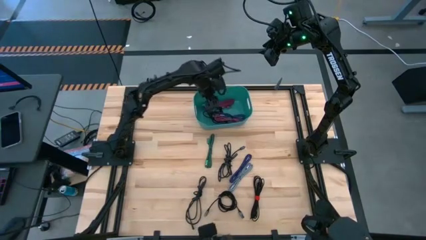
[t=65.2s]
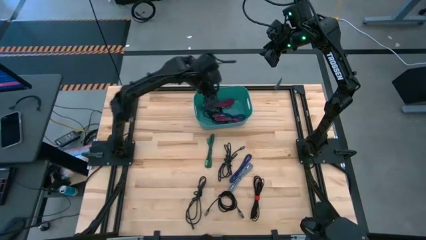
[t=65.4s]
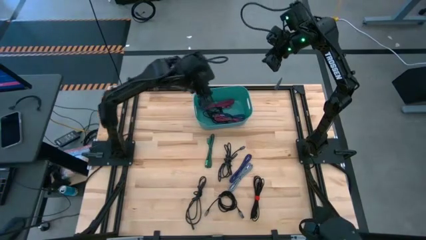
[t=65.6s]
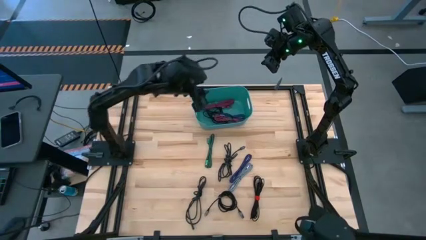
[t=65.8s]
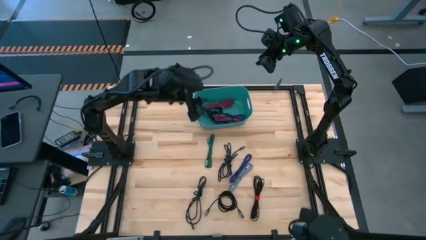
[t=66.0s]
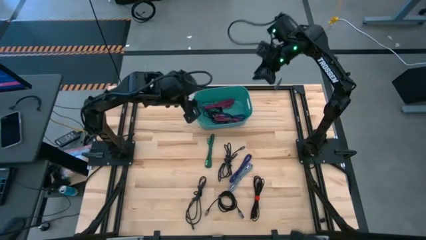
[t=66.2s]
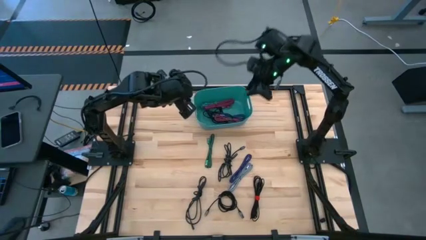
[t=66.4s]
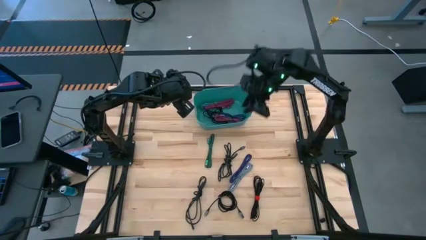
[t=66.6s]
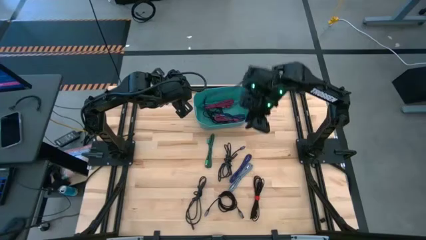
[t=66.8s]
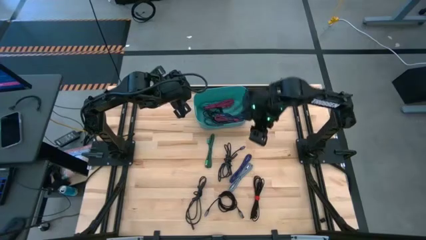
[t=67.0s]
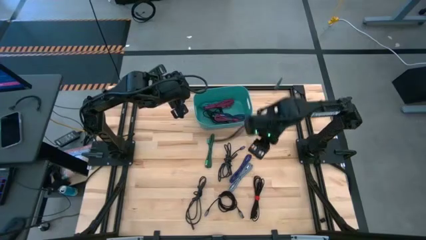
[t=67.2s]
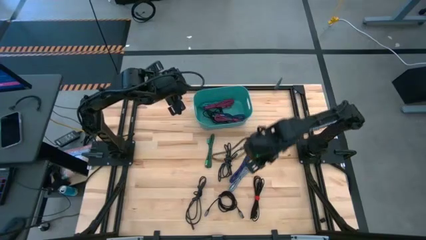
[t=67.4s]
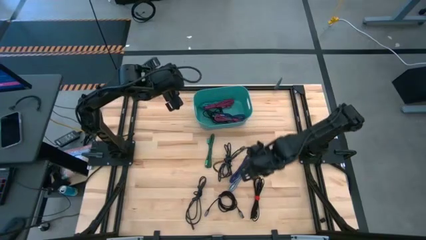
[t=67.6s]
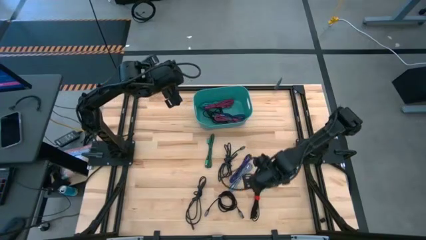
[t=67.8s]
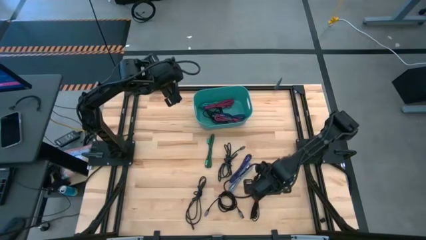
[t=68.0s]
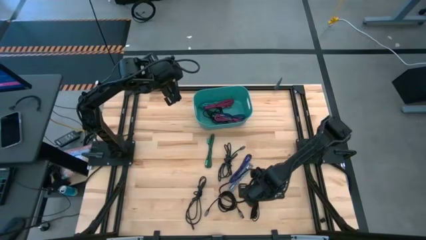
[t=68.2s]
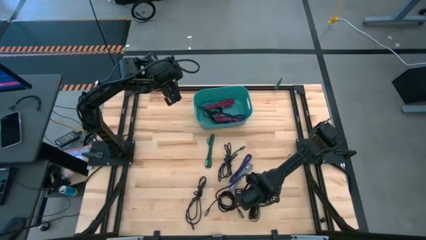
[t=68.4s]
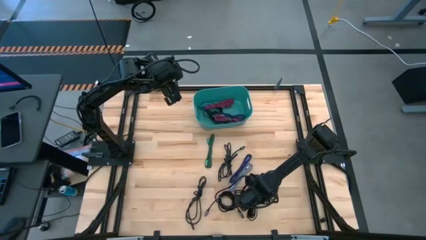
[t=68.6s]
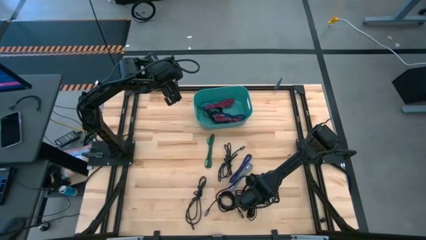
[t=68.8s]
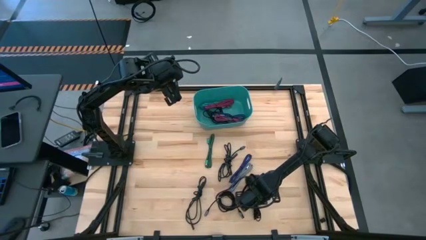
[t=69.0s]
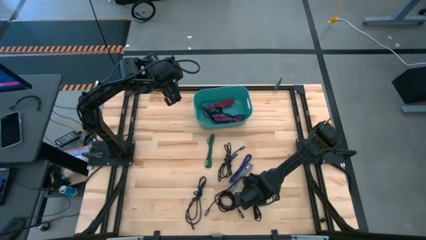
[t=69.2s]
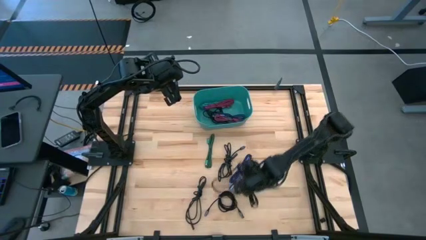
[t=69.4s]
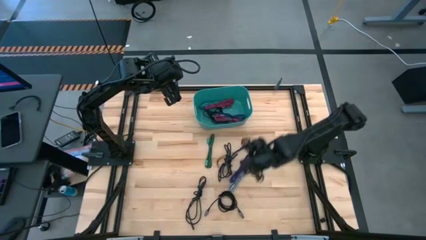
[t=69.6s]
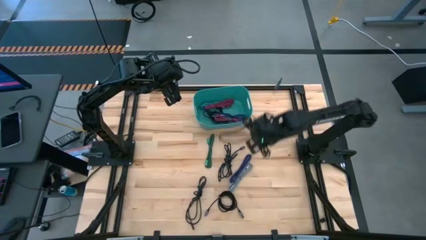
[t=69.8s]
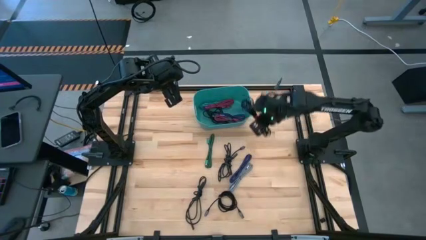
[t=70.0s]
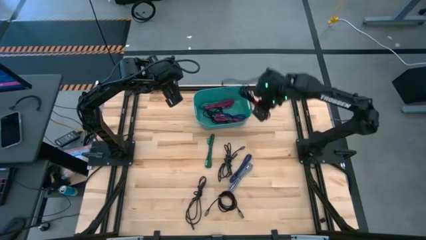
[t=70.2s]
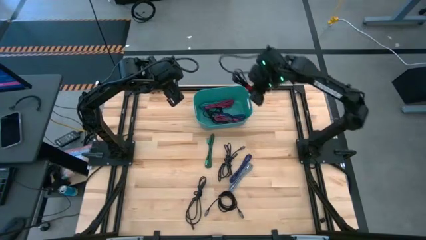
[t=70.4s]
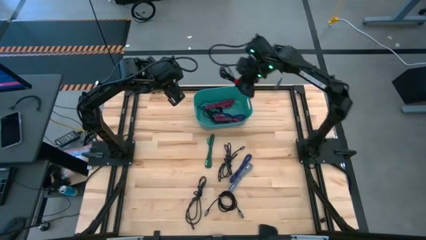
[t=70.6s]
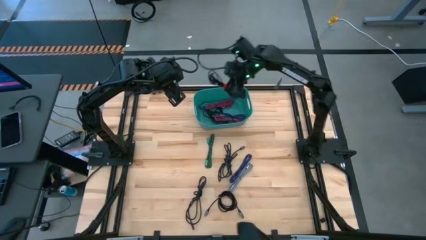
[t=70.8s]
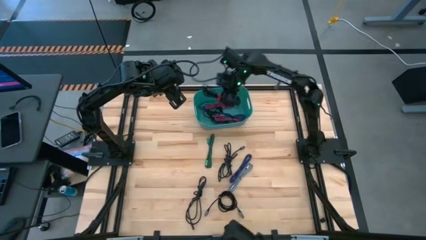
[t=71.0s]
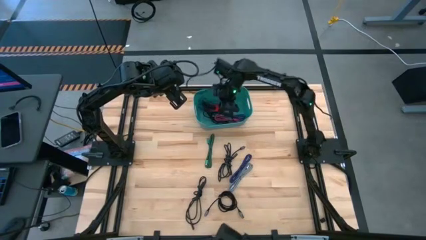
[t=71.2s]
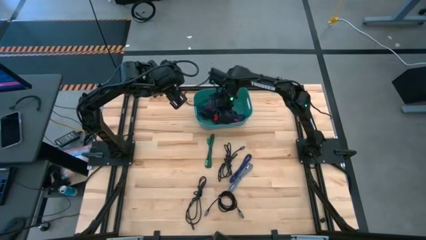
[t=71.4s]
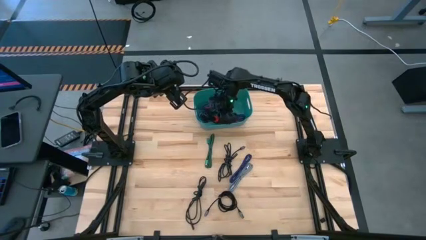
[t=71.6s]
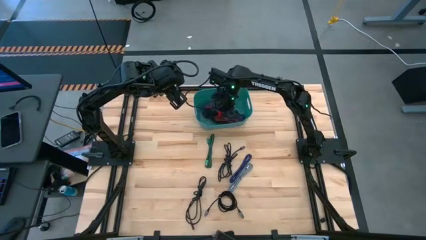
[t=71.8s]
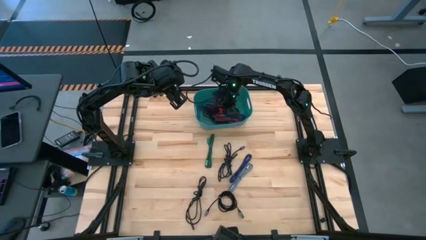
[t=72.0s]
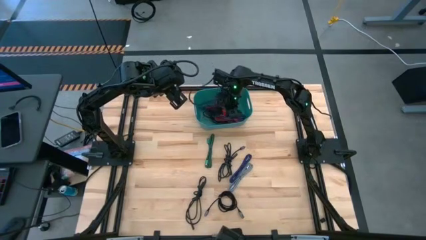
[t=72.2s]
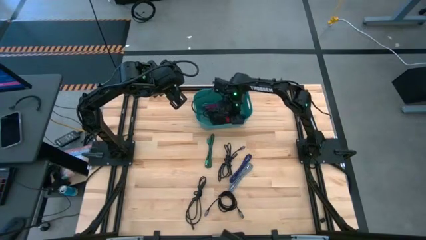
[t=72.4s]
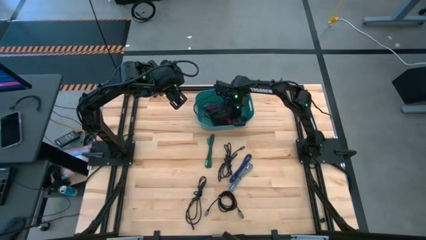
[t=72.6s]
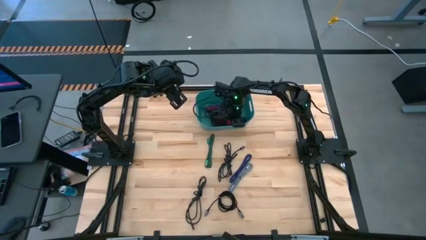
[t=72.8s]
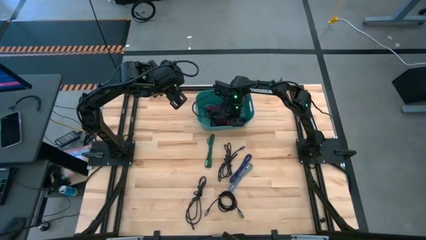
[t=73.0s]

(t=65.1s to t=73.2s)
Task: Pick and place USB-C Cables
Put the black charger cable into the light blue bin

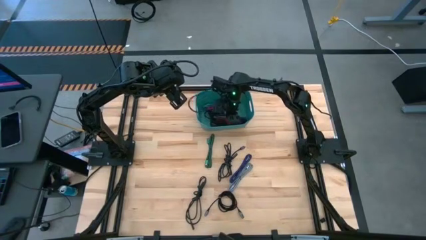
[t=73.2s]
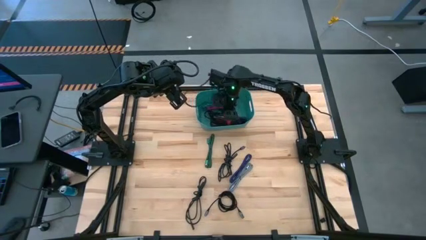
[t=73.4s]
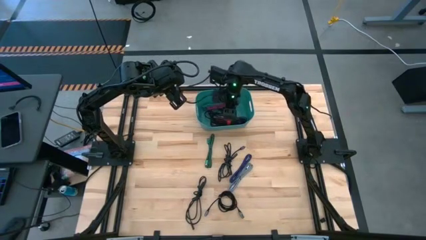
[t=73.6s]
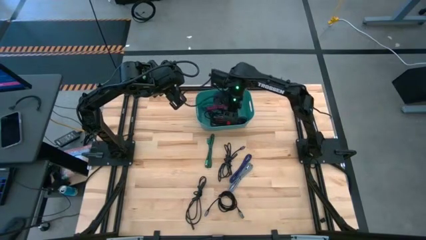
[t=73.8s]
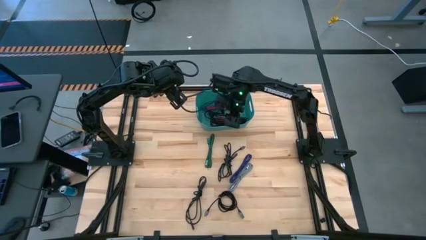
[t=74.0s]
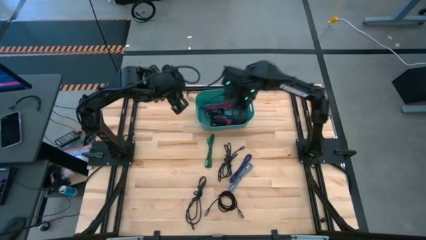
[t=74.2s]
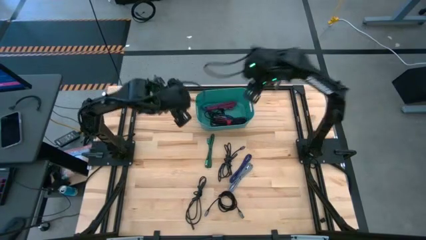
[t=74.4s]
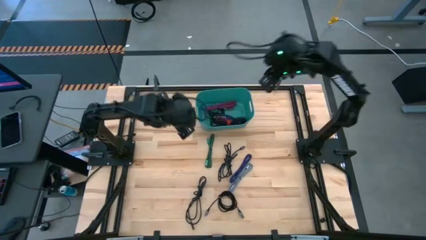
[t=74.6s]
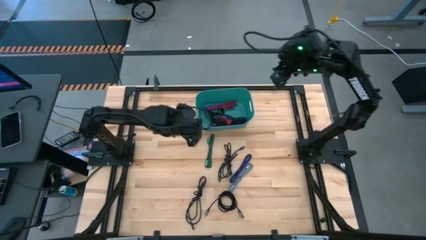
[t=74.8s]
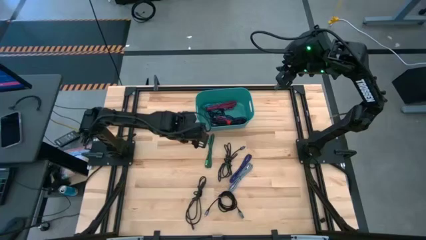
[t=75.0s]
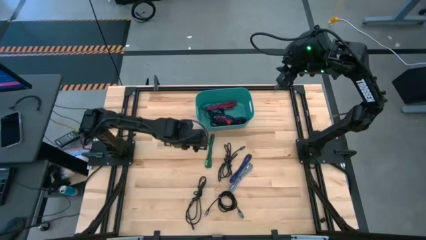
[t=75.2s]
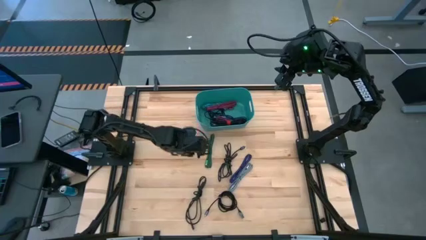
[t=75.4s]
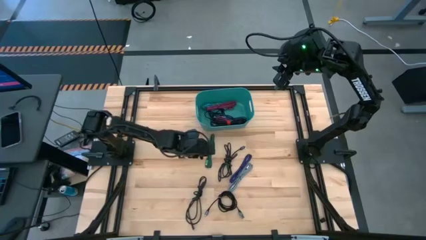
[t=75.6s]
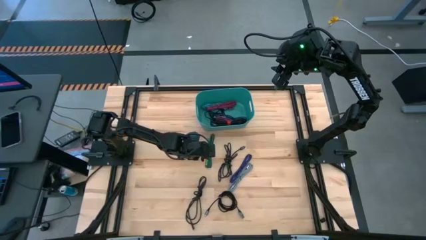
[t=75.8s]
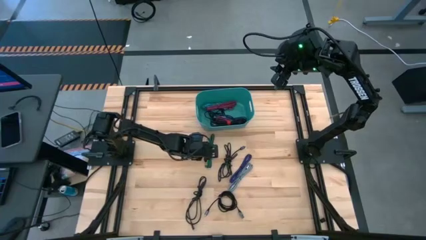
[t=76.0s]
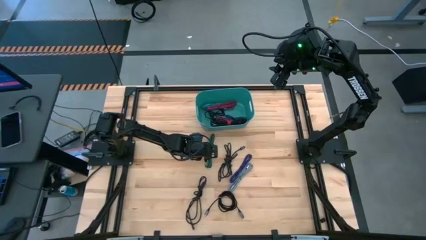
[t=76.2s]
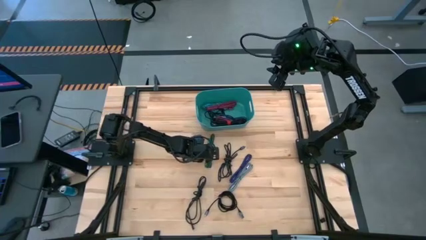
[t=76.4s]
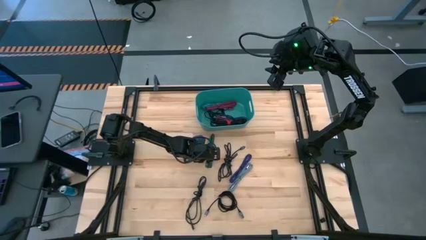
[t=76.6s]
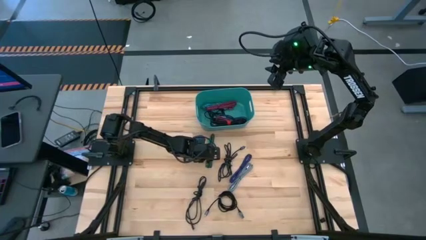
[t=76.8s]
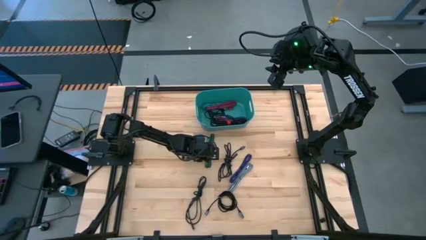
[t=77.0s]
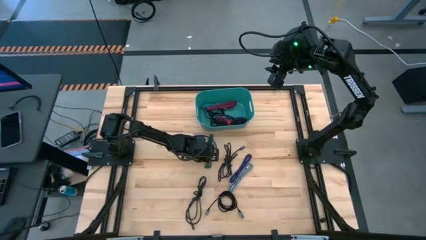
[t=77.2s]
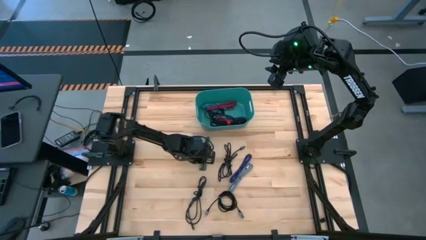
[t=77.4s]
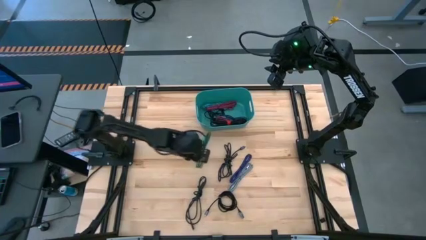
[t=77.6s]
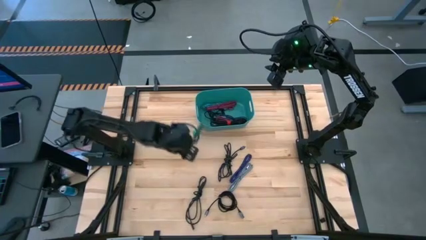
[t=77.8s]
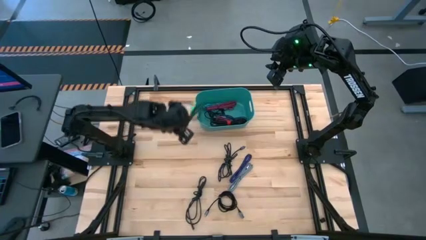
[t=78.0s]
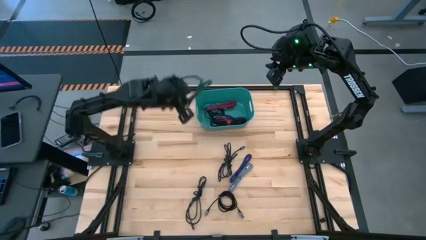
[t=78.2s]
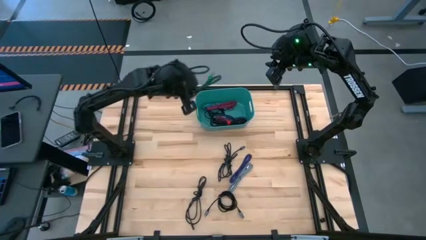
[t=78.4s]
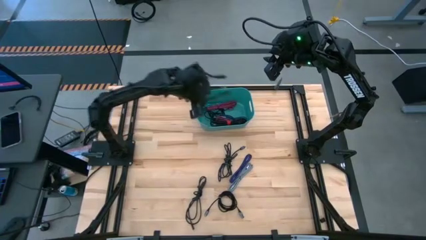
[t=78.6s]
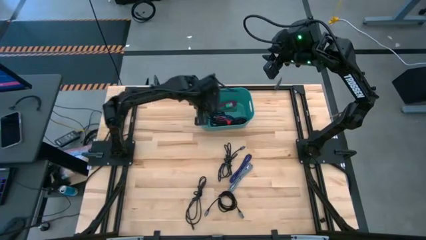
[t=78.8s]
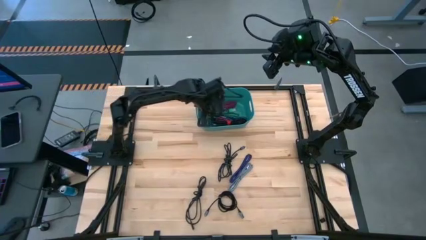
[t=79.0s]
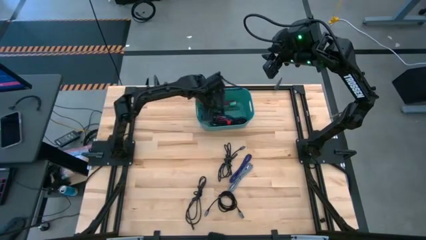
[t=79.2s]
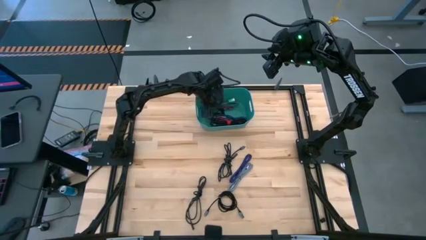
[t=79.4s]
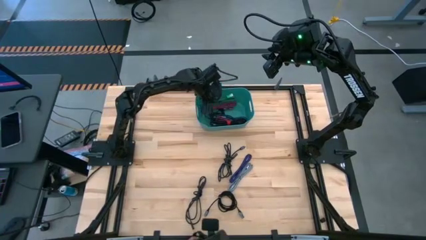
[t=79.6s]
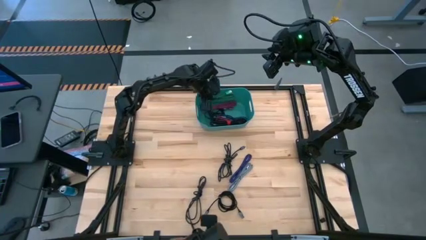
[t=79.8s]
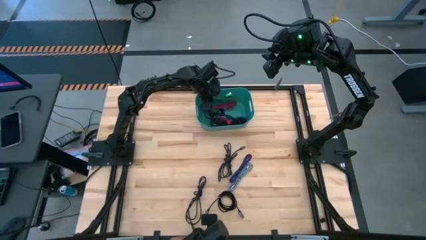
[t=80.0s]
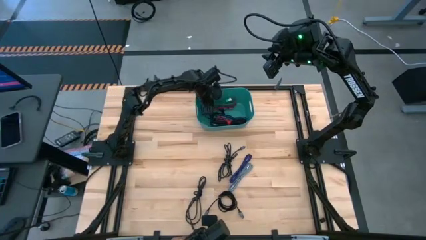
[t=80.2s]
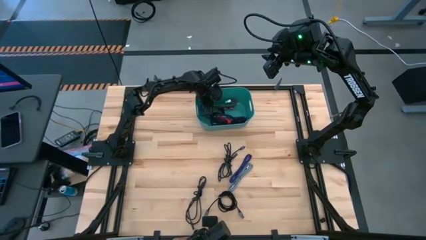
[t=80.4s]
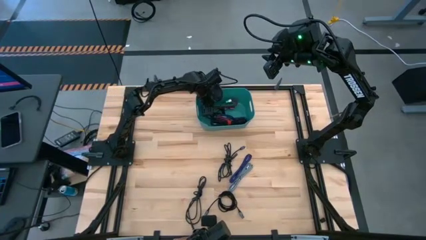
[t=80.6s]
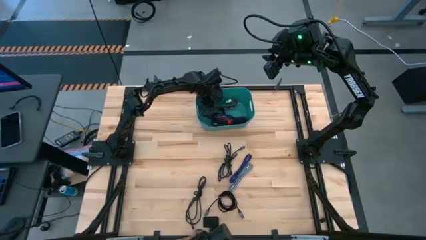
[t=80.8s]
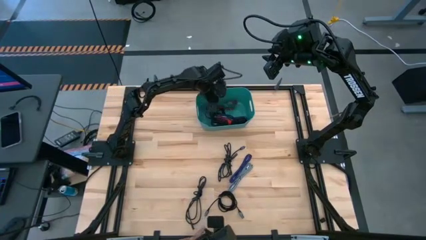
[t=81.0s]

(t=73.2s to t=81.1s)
Put the green charger cable into the light blue bin
